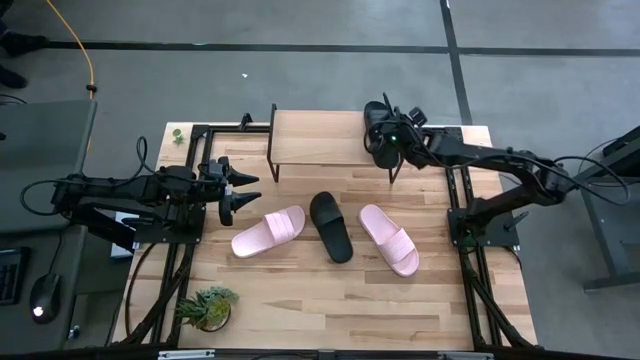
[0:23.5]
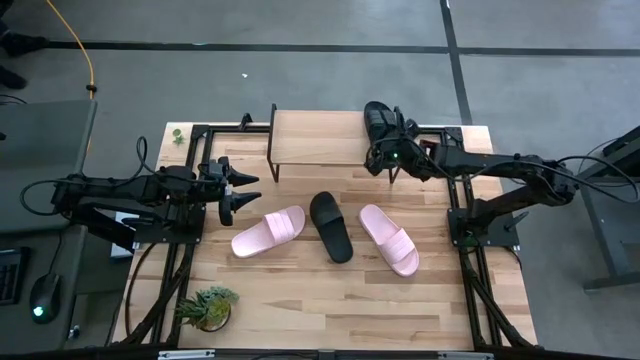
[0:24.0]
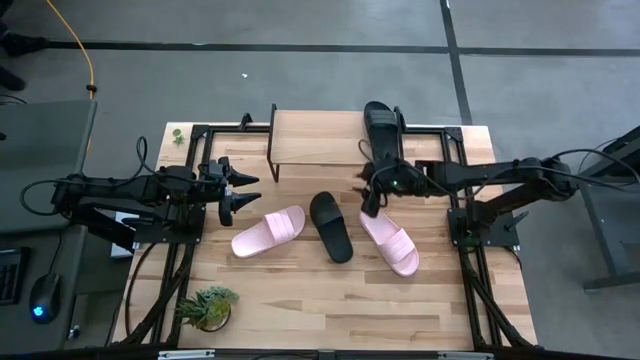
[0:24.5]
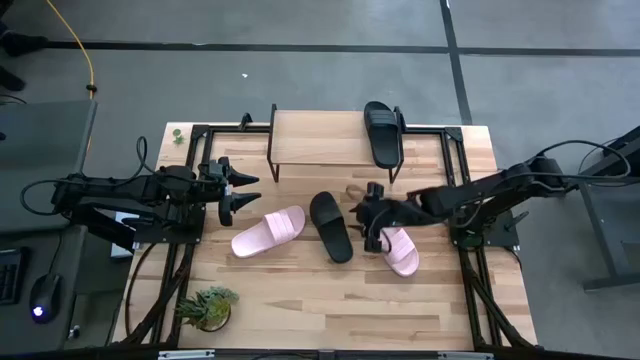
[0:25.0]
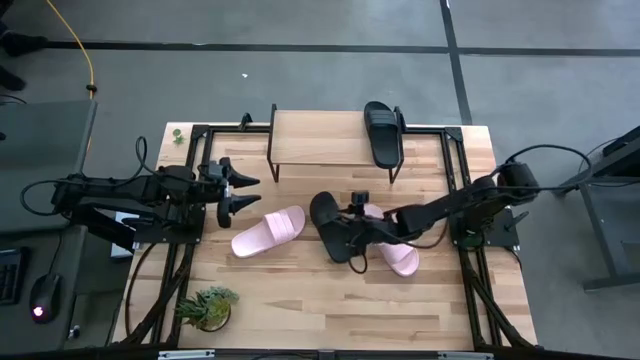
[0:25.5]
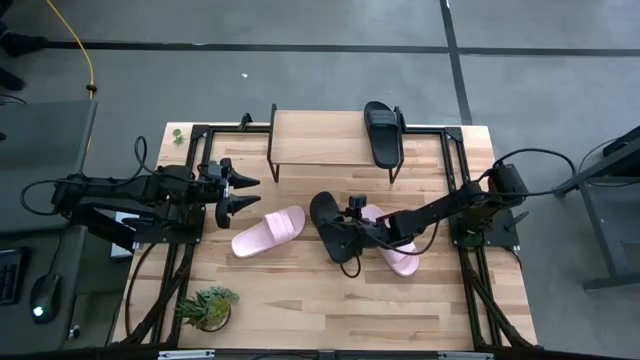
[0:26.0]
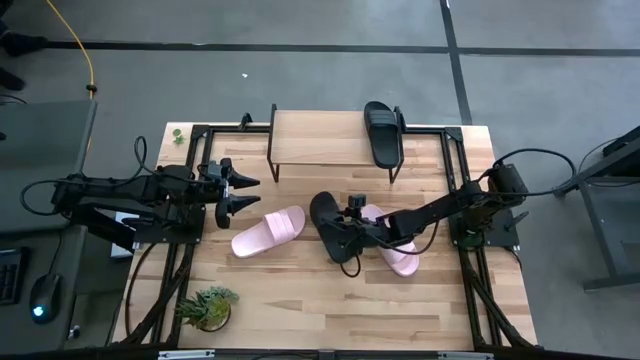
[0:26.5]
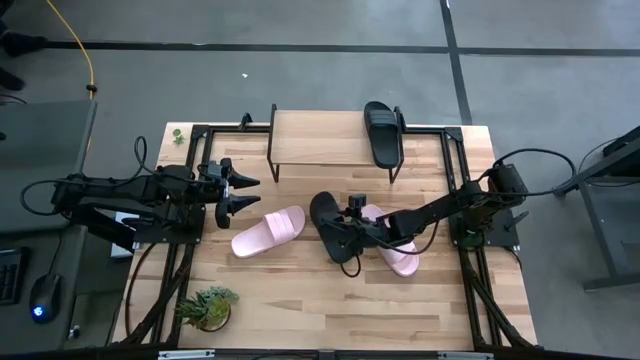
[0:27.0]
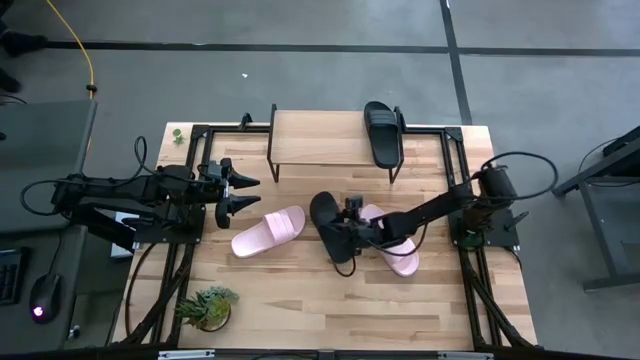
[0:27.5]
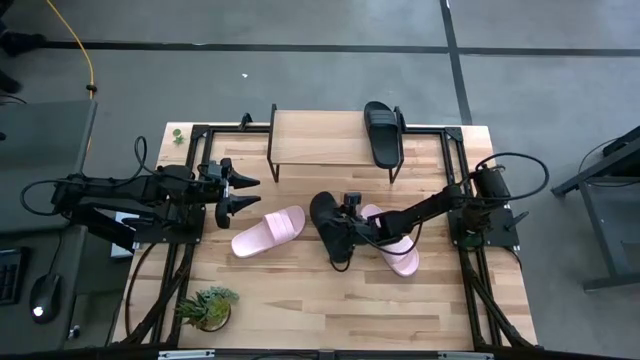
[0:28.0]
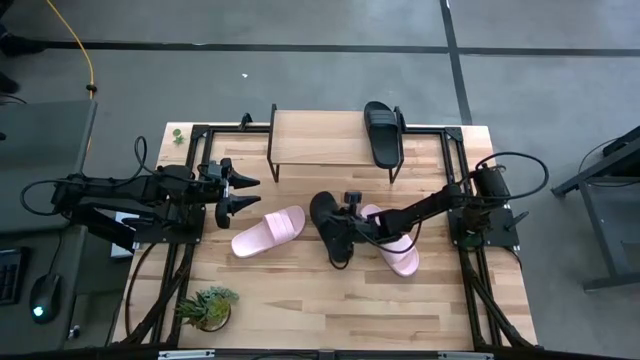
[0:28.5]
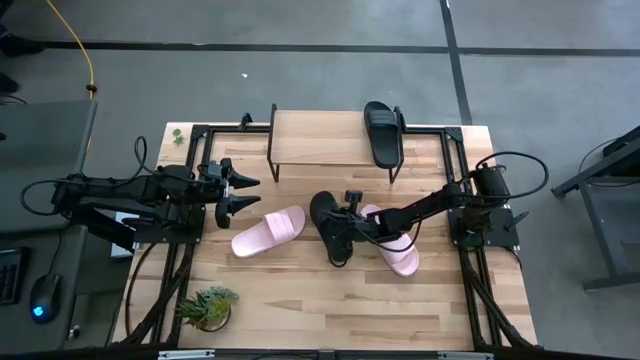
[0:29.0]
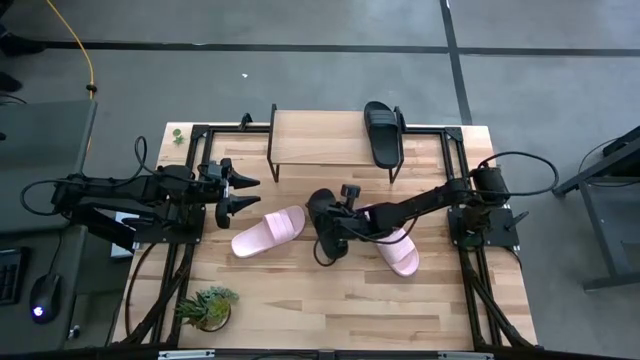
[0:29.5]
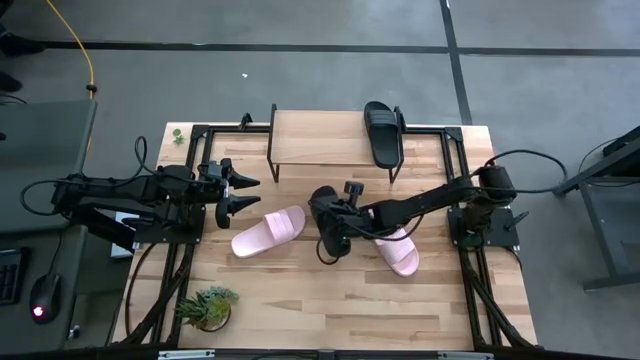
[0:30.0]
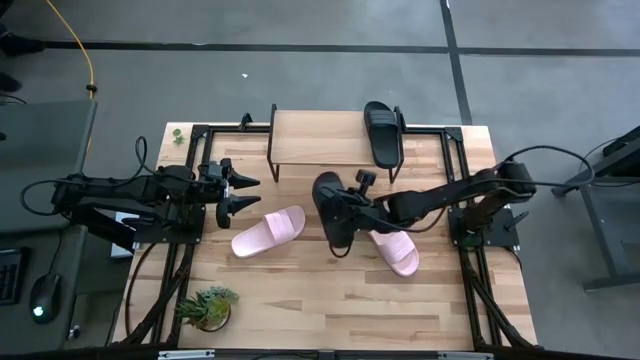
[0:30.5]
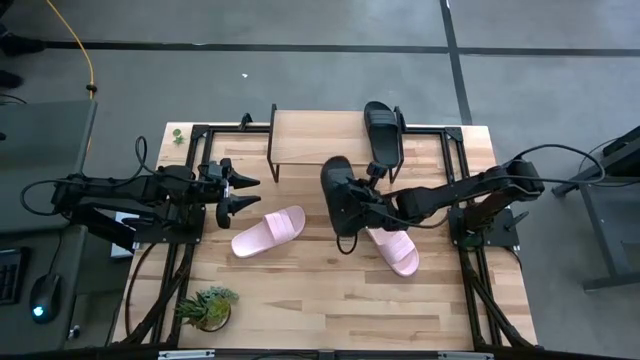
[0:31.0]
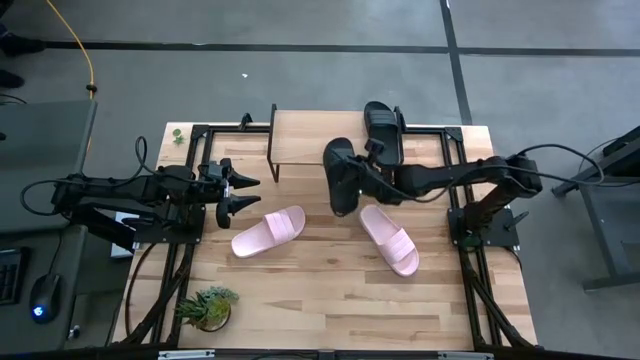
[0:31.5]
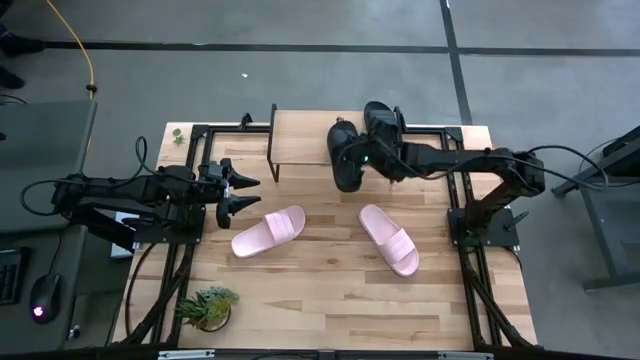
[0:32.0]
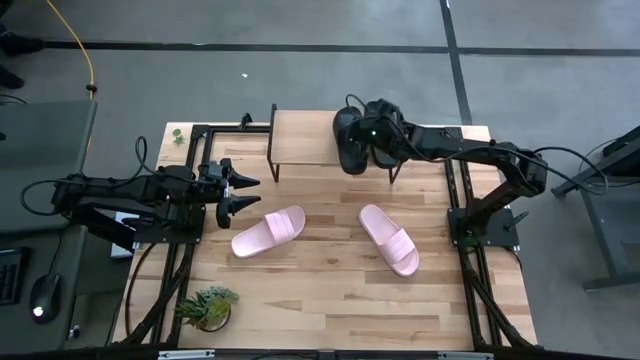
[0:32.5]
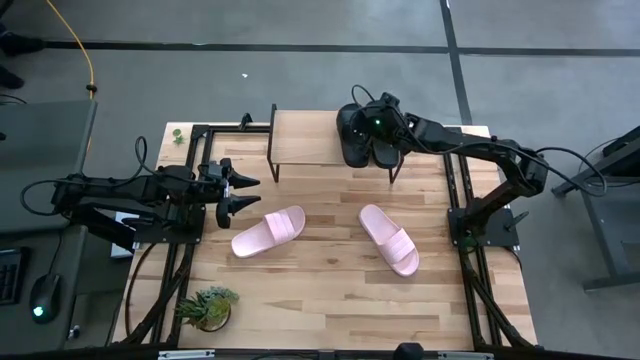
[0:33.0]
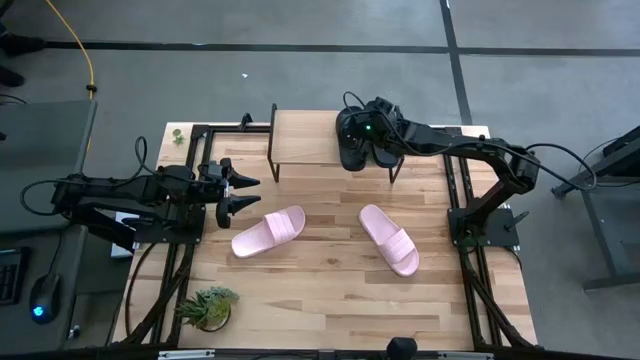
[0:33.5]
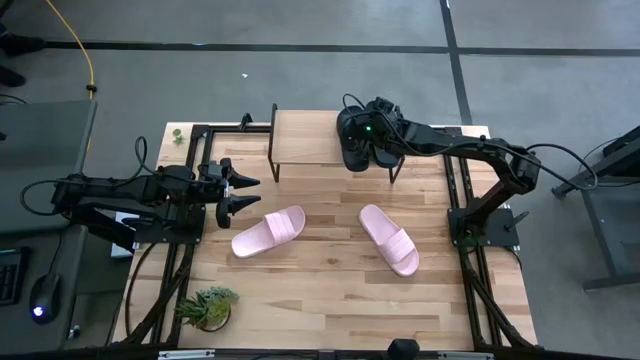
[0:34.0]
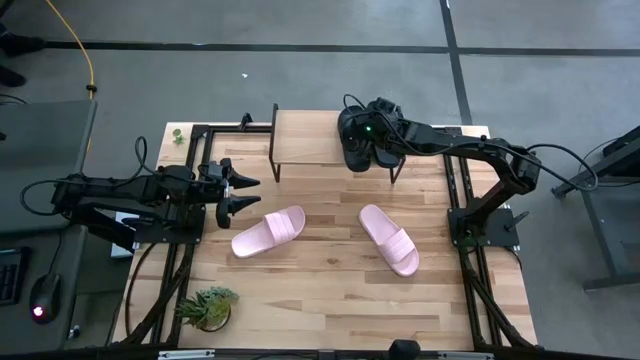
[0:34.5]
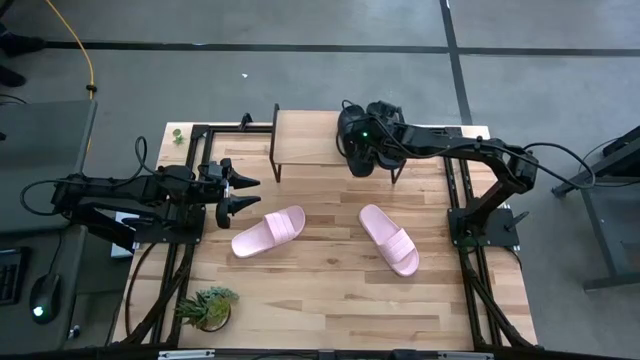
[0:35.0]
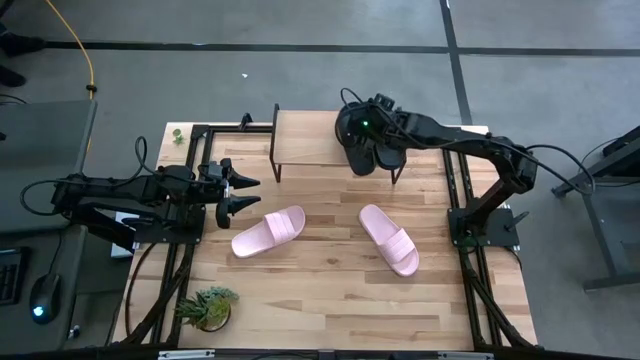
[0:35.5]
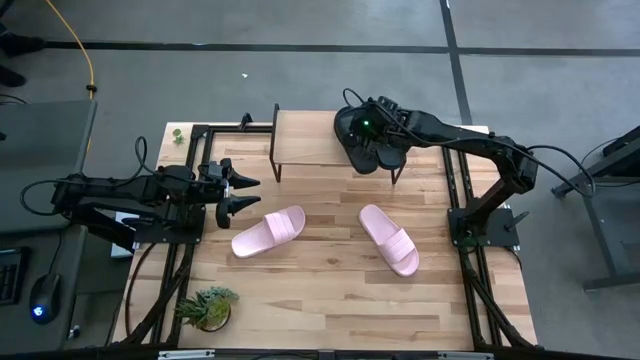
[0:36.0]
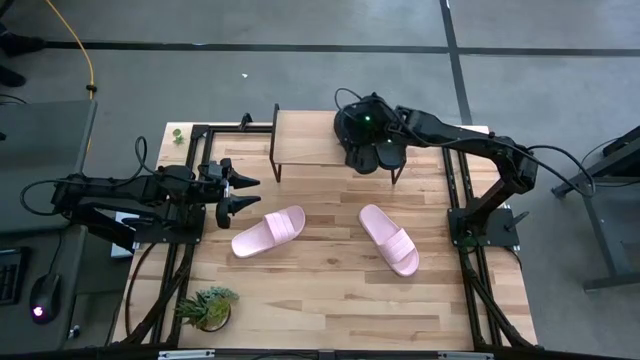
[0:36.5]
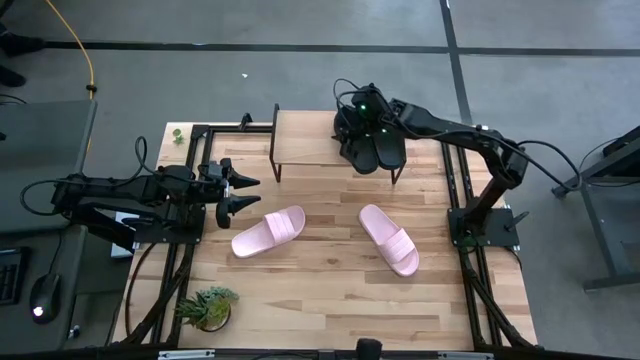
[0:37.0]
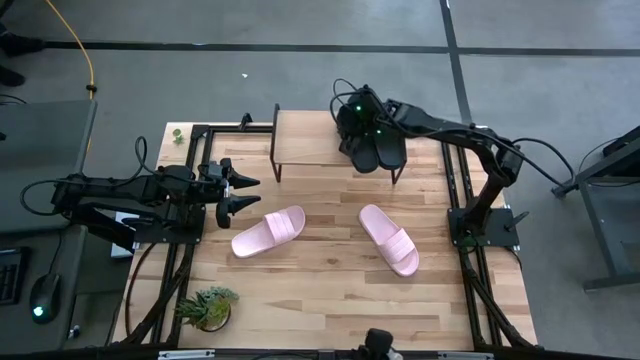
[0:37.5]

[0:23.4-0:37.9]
Task: Pick and place slides into the shelf
Put the black slide on the shelf
